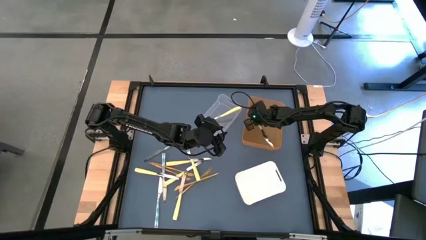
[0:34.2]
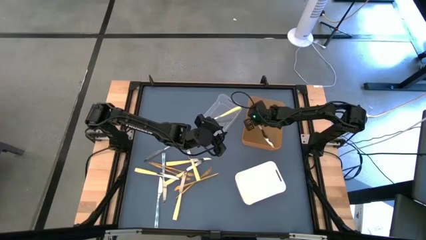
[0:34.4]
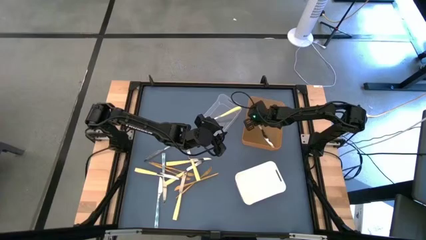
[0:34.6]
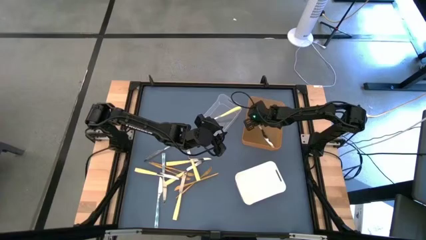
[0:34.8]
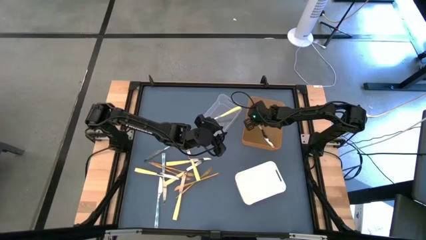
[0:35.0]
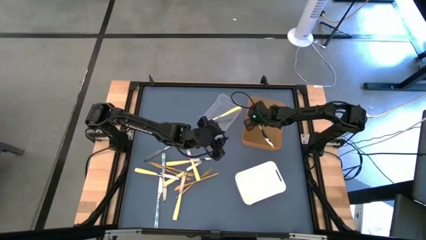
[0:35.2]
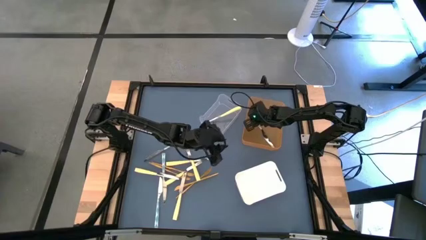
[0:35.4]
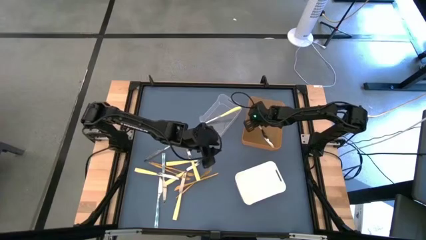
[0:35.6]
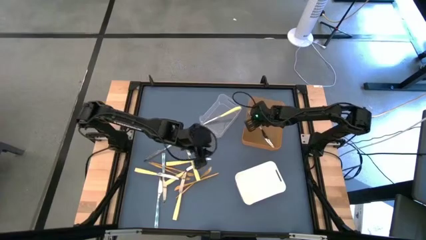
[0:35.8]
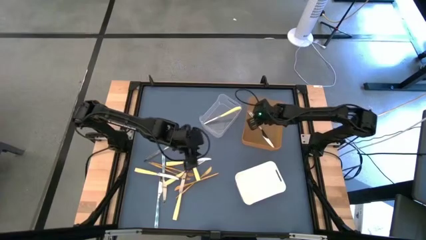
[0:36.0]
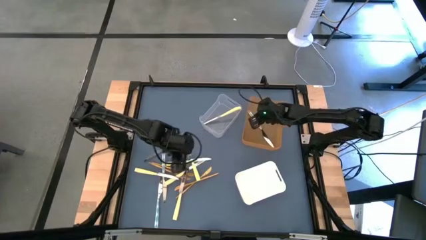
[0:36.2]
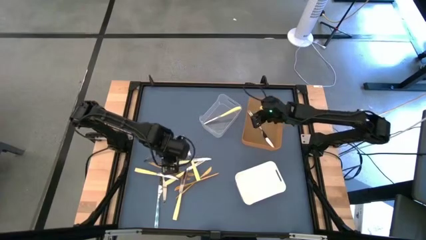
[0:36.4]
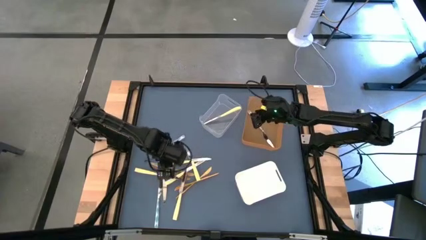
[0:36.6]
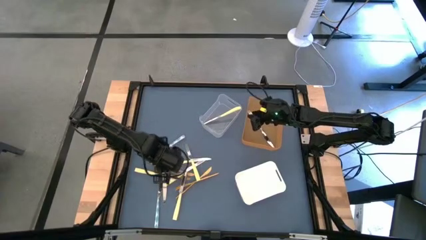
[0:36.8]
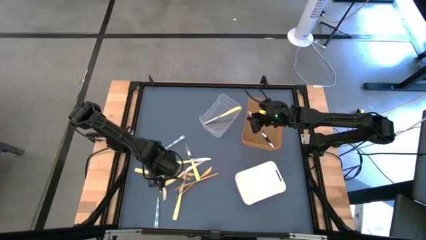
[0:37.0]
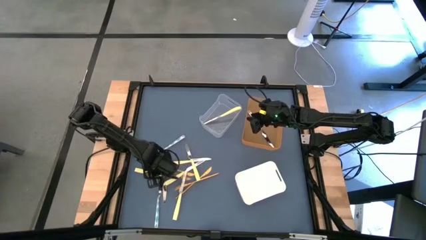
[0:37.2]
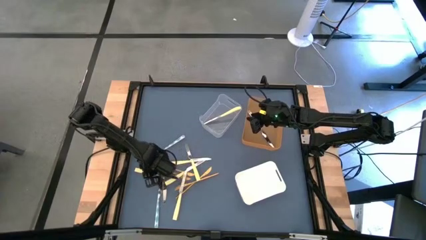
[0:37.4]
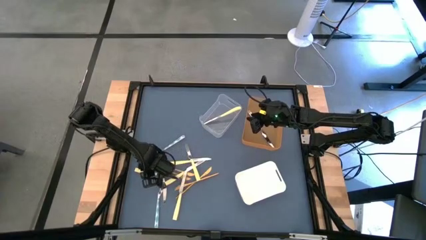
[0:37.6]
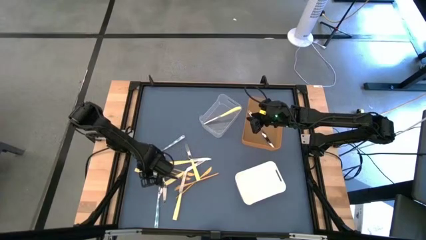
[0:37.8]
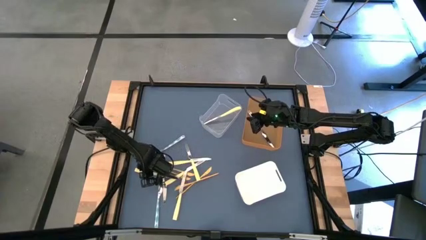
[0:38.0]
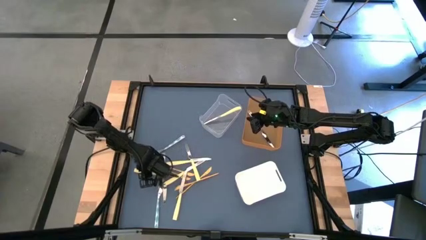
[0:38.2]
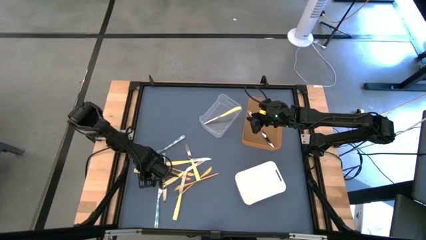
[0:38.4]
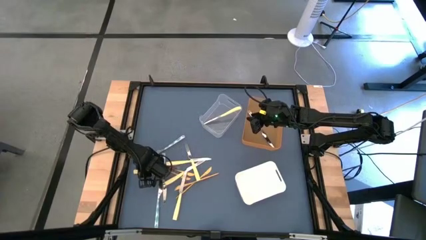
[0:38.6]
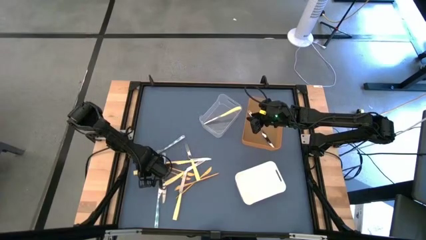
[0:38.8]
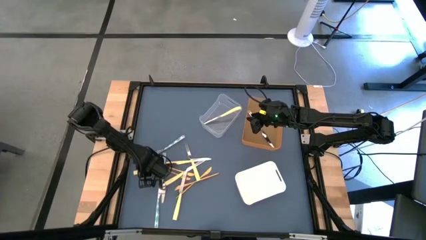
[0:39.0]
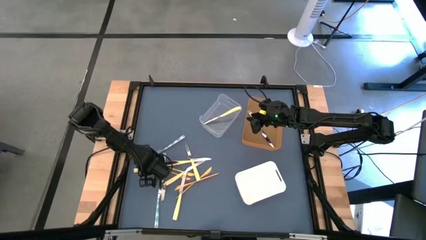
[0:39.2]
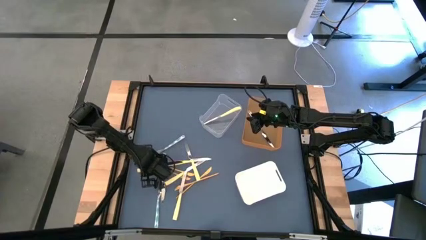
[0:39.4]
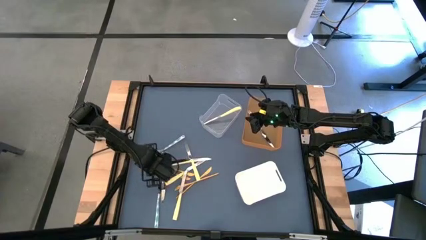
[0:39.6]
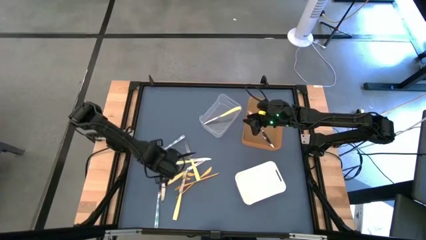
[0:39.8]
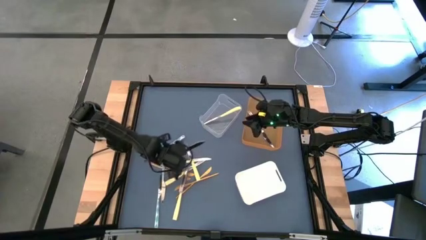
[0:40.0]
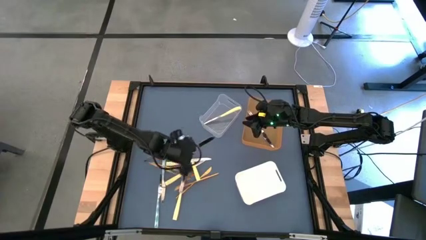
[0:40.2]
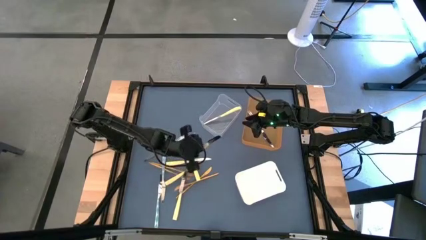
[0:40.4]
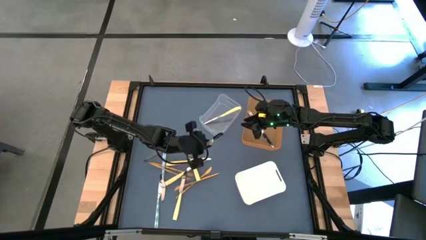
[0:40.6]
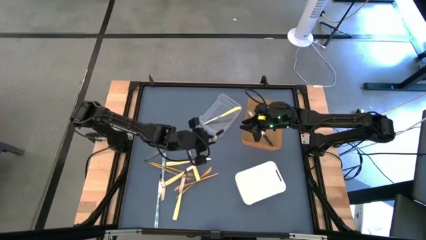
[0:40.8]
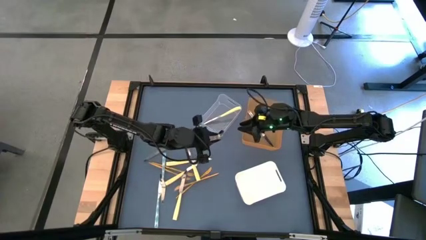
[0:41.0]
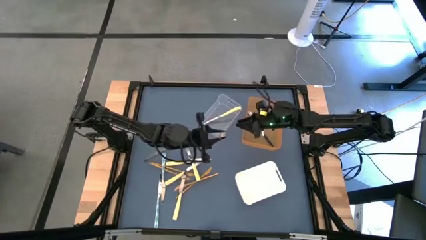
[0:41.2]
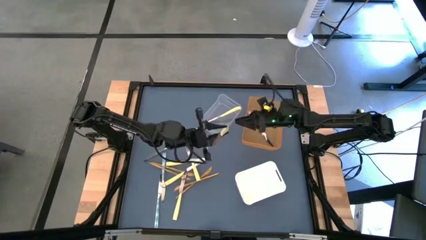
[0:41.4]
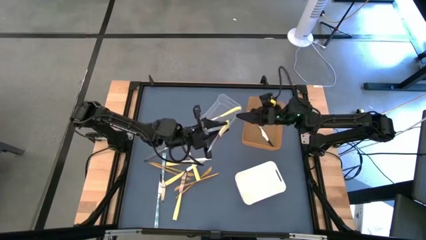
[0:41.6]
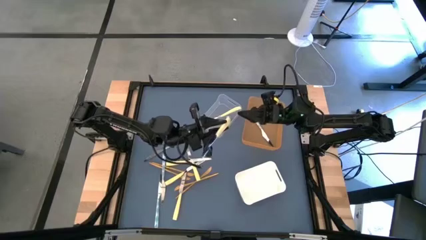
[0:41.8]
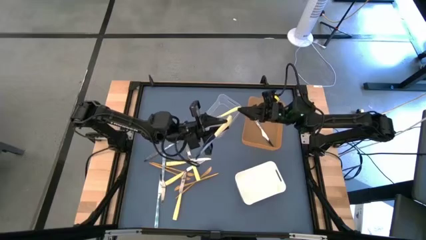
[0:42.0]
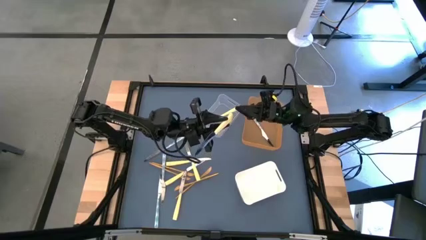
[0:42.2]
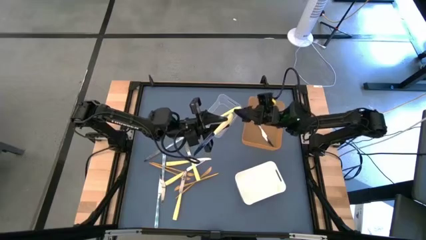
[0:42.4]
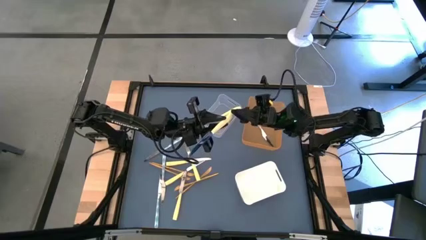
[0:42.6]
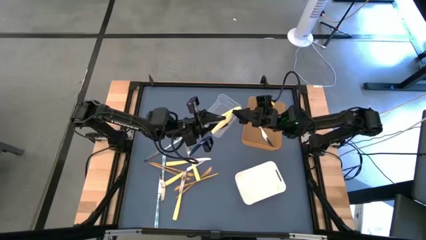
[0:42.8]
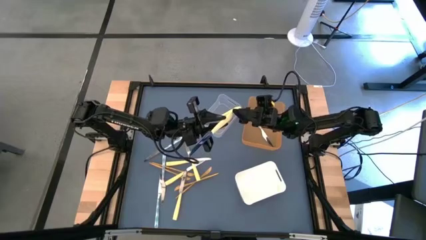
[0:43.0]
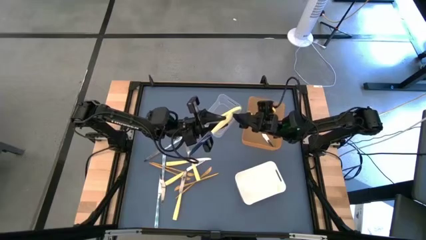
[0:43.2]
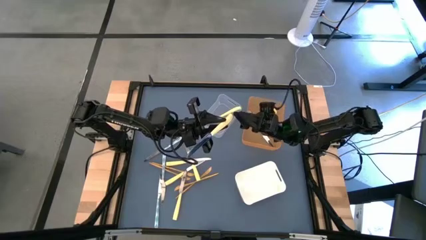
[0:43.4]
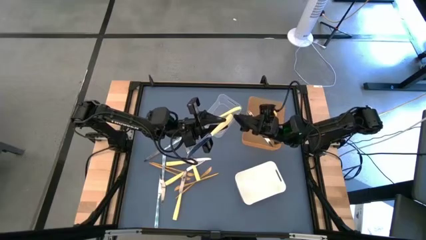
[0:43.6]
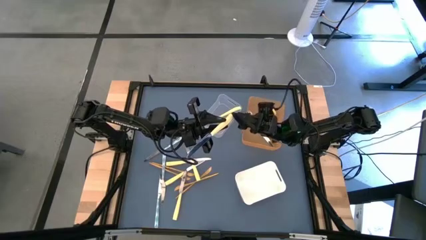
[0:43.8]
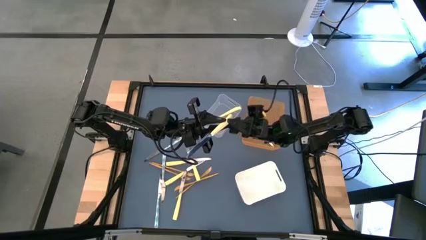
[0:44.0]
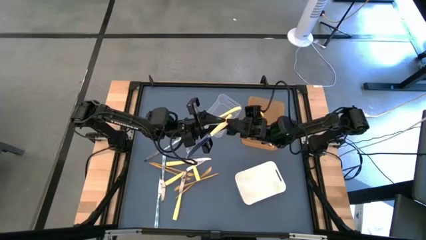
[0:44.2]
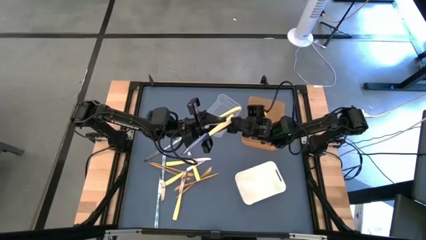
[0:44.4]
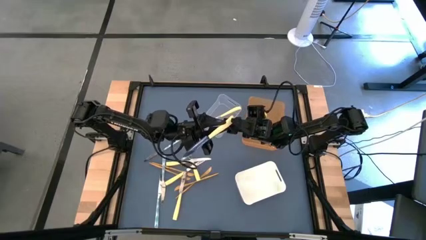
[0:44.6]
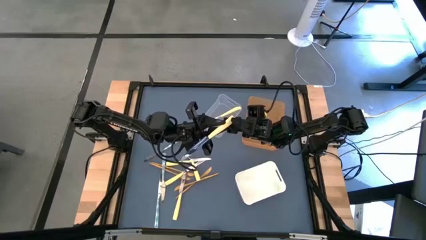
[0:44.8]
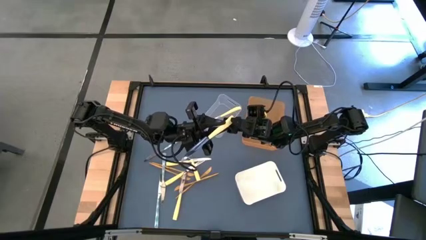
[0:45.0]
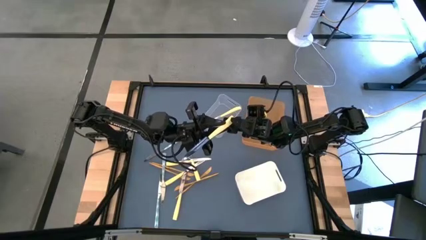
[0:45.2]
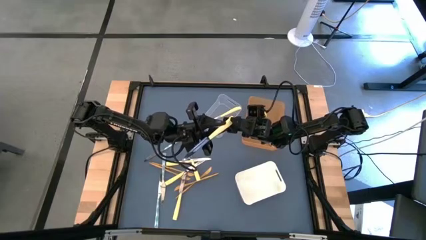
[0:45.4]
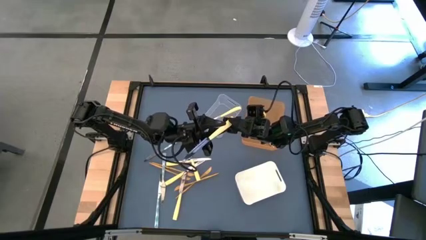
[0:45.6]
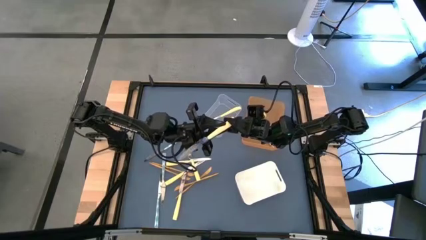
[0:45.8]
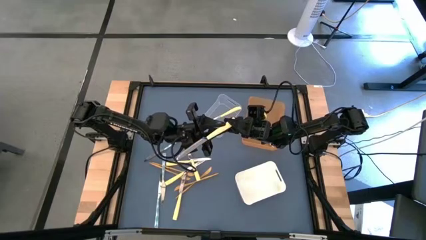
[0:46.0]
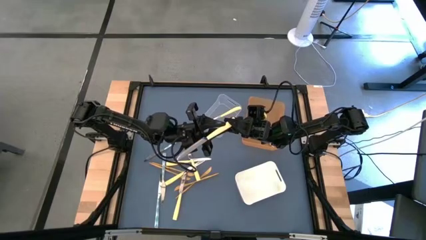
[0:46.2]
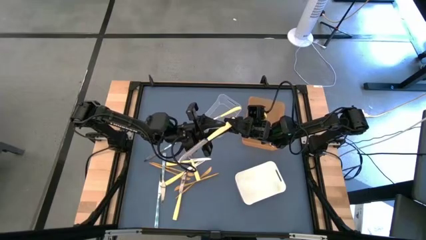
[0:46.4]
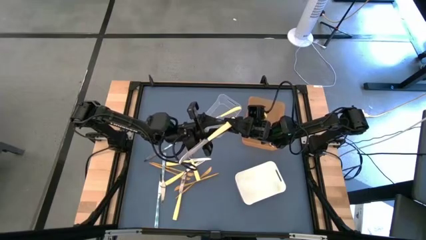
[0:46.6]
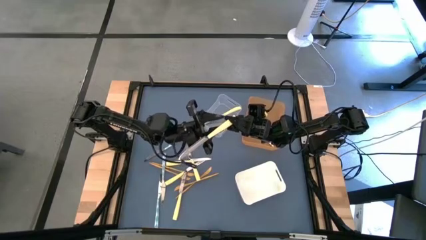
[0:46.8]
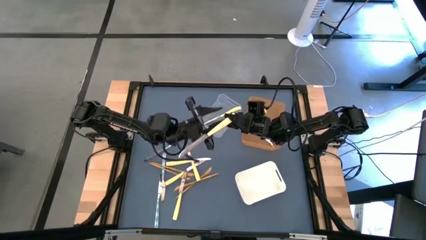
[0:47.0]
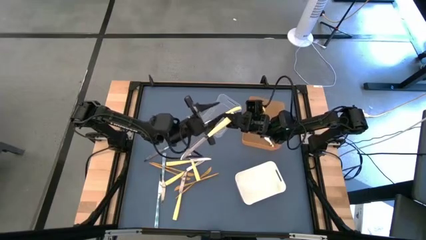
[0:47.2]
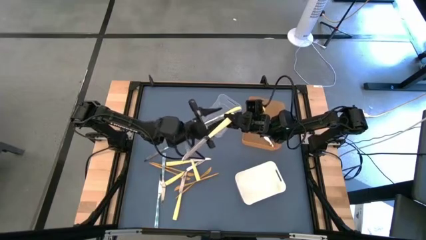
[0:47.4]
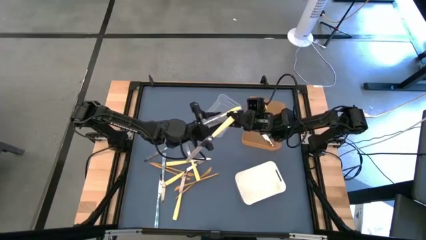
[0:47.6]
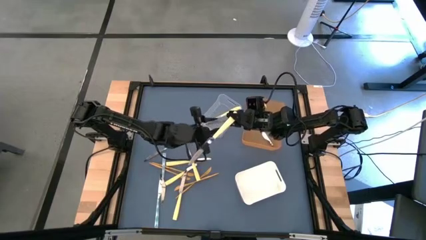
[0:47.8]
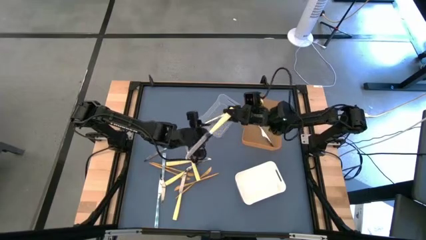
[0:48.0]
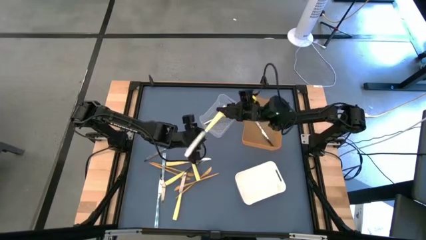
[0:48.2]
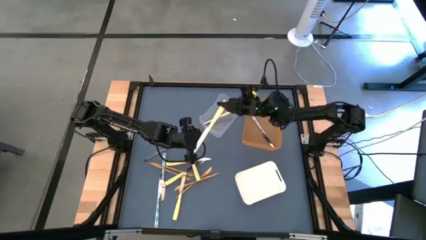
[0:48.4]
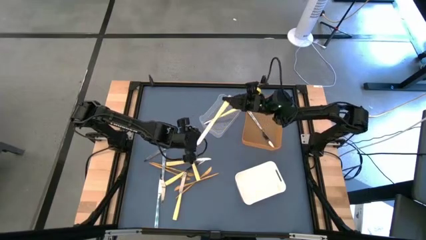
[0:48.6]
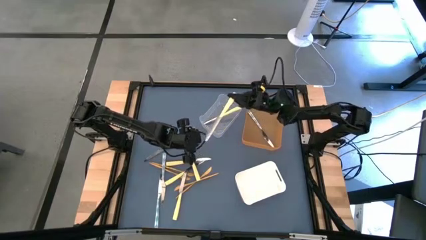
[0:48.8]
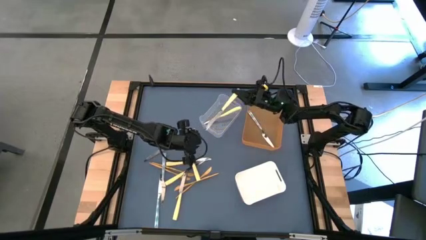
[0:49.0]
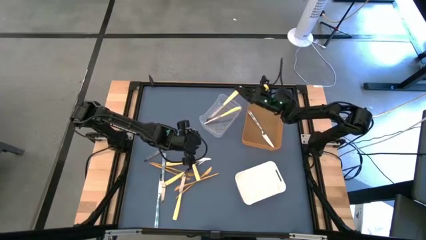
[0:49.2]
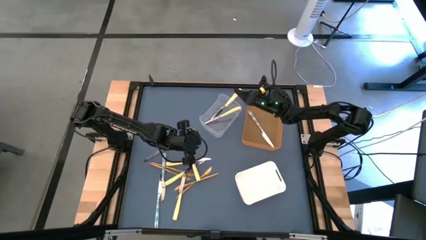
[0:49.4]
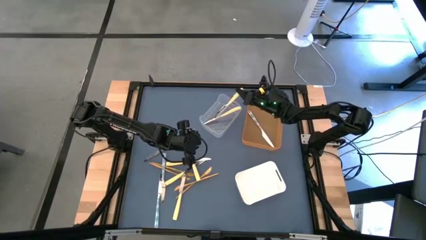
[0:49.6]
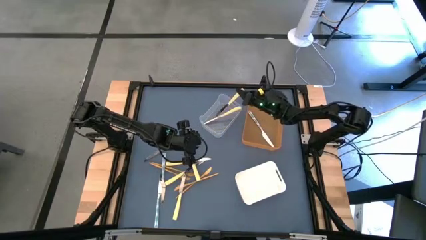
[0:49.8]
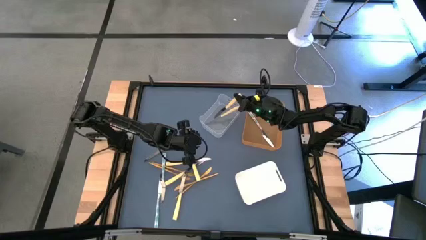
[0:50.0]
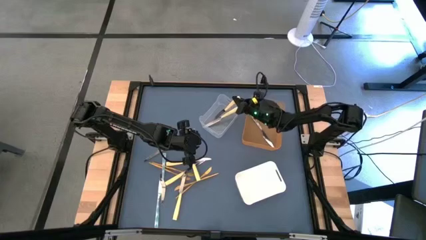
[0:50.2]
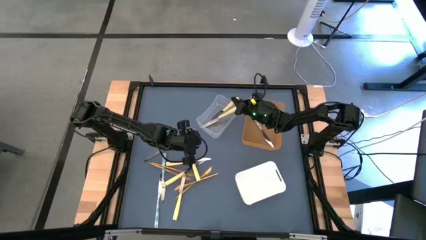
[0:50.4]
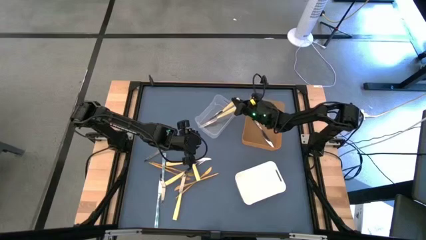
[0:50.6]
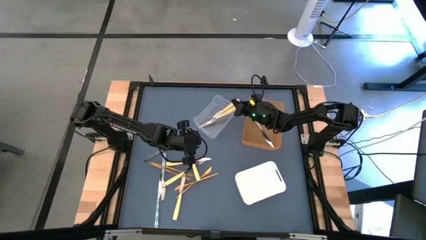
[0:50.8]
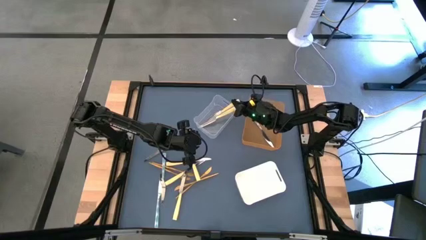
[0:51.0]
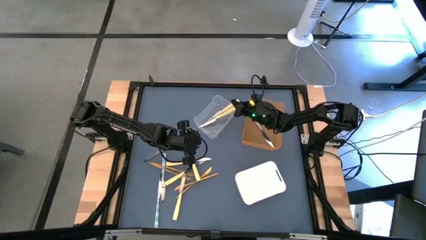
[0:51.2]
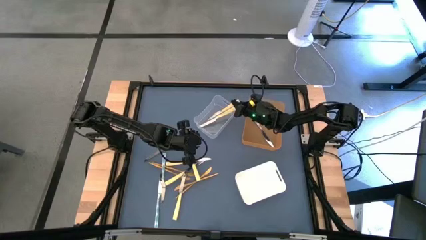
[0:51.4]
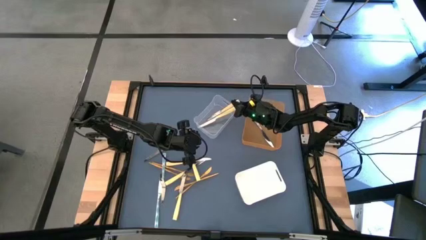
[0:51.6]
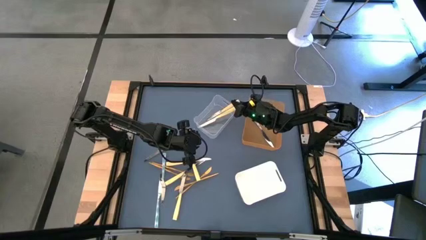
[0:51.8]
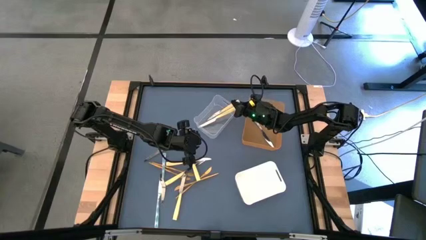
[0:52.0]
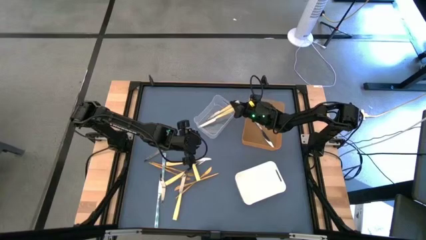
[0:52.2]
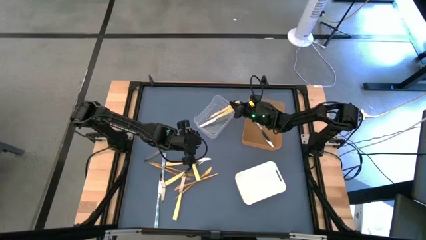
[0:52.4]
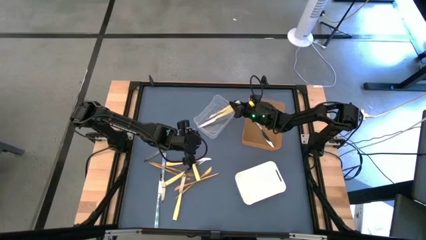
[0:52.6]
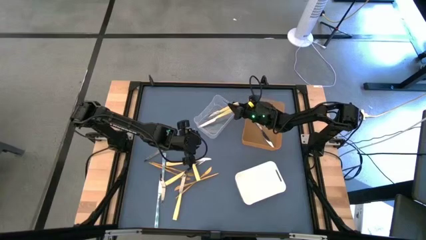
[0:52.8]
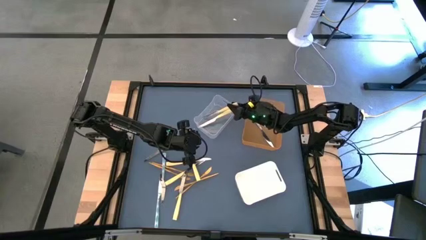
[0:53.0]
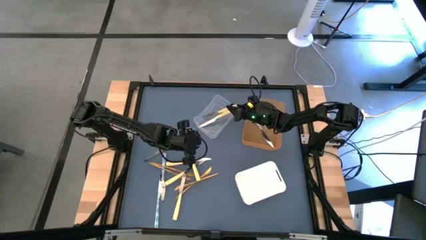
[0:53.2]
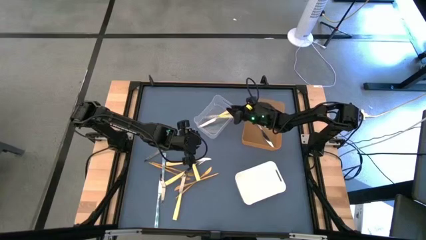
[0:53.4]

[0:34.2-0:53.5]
Task: Sort silverware by color (type)
Put the yellow knife into the transparent bin
